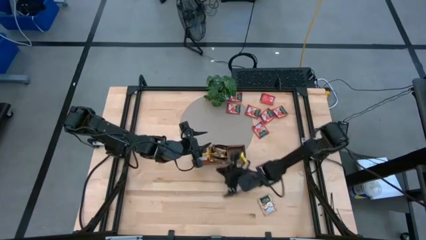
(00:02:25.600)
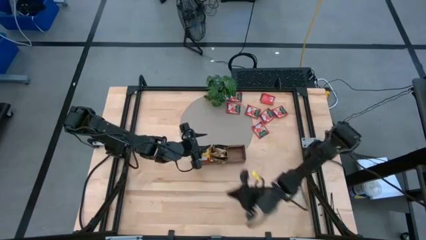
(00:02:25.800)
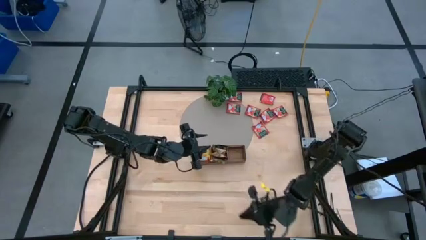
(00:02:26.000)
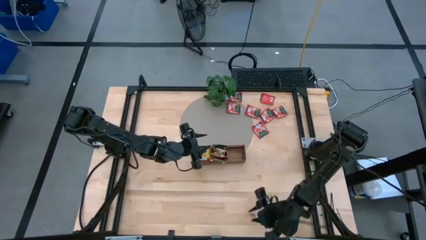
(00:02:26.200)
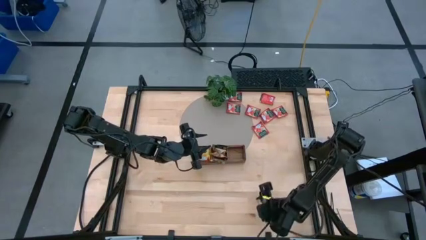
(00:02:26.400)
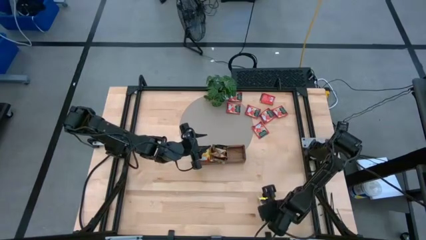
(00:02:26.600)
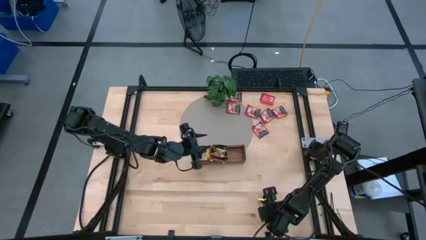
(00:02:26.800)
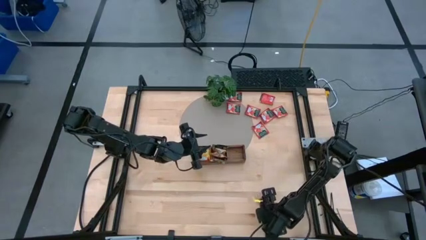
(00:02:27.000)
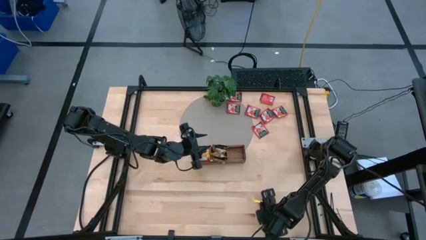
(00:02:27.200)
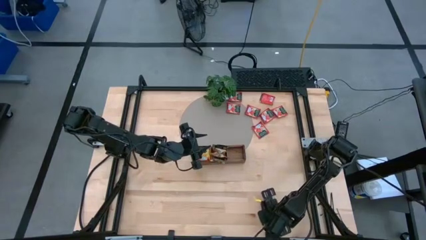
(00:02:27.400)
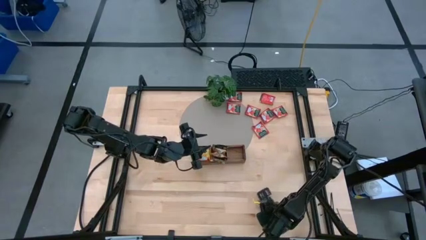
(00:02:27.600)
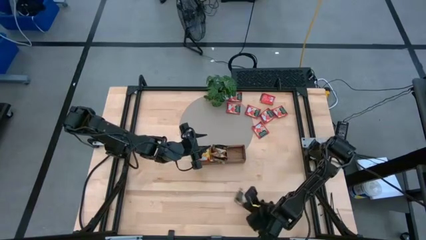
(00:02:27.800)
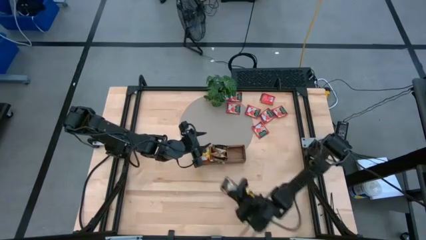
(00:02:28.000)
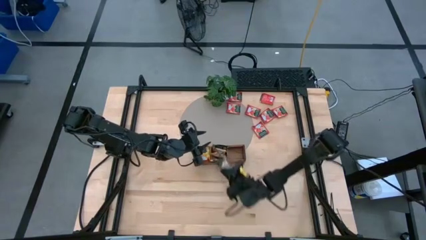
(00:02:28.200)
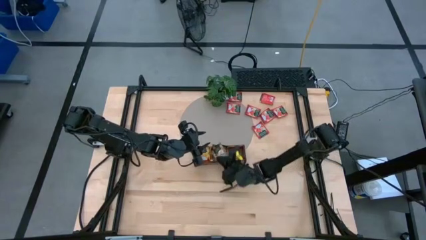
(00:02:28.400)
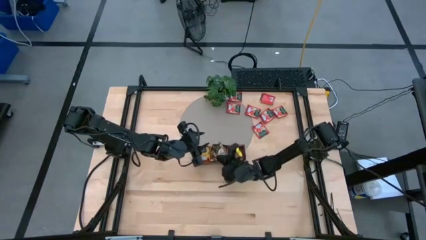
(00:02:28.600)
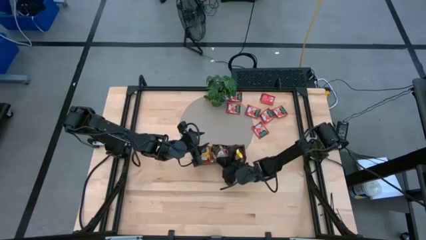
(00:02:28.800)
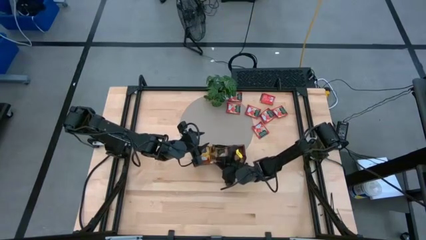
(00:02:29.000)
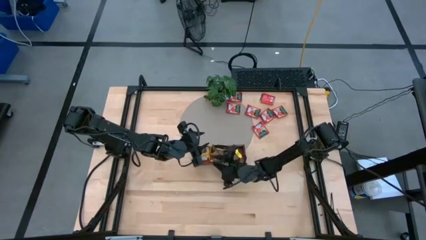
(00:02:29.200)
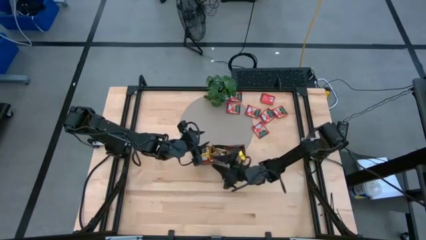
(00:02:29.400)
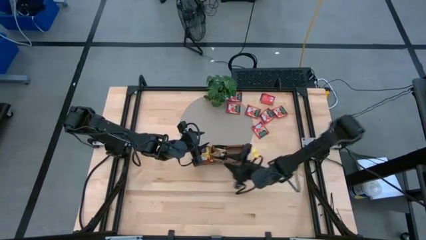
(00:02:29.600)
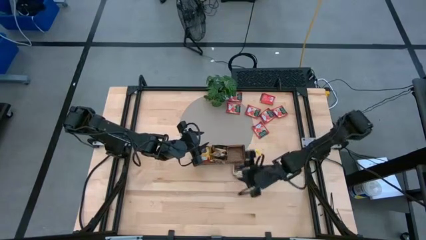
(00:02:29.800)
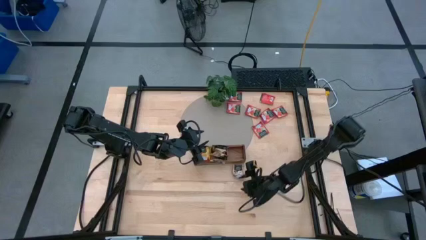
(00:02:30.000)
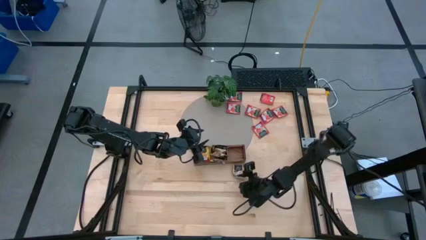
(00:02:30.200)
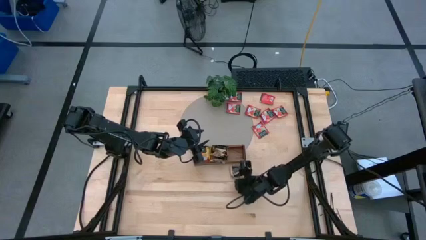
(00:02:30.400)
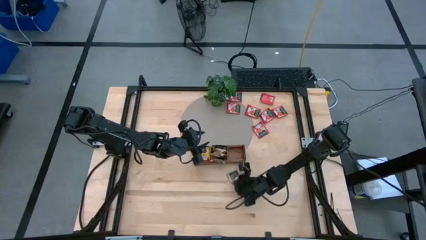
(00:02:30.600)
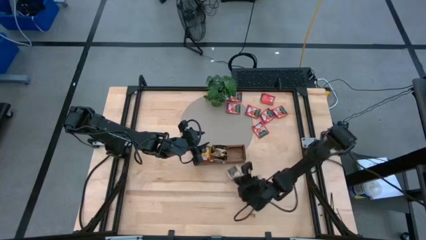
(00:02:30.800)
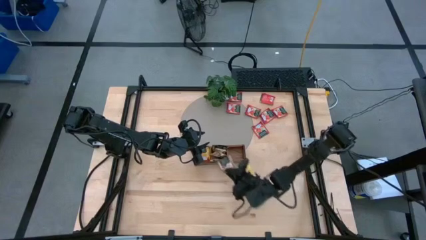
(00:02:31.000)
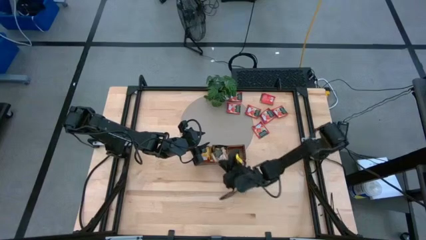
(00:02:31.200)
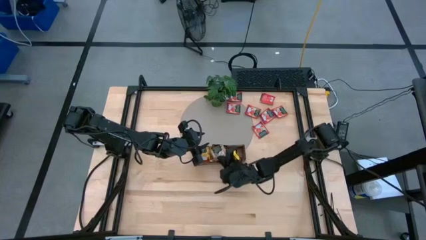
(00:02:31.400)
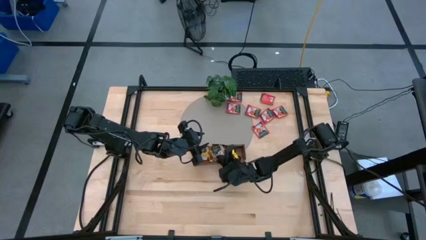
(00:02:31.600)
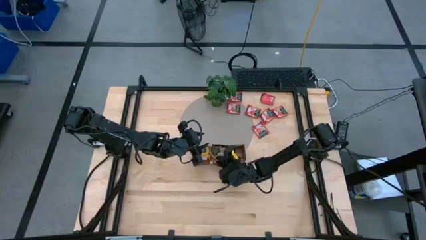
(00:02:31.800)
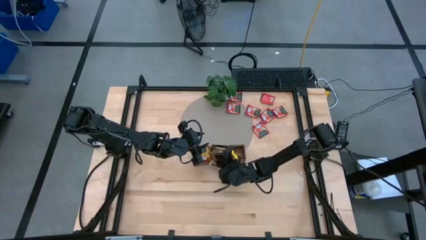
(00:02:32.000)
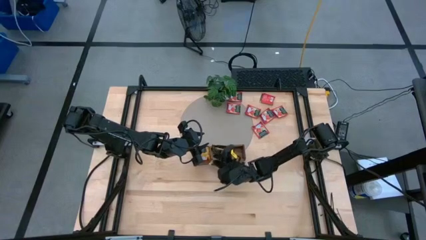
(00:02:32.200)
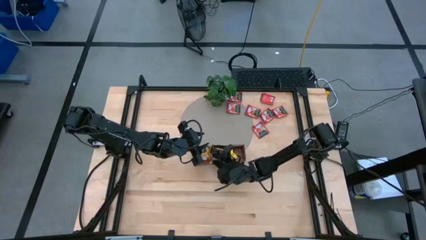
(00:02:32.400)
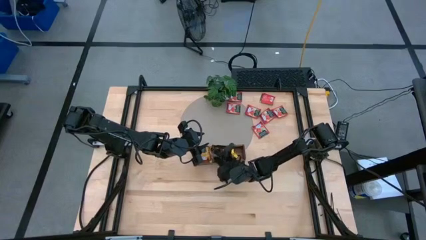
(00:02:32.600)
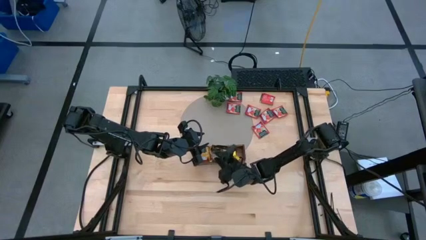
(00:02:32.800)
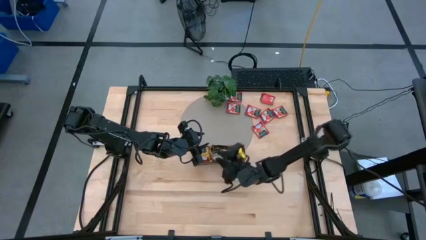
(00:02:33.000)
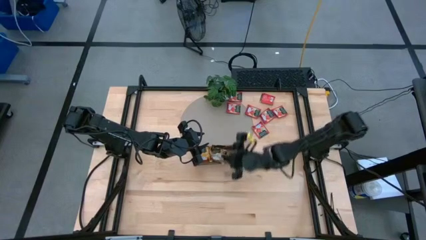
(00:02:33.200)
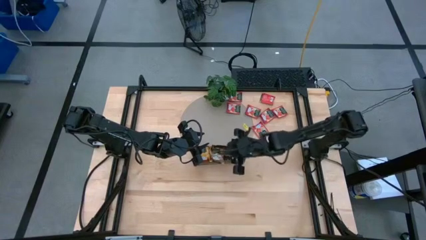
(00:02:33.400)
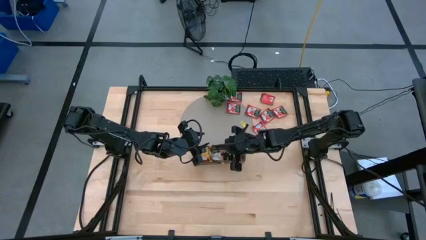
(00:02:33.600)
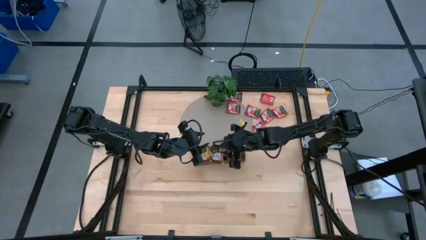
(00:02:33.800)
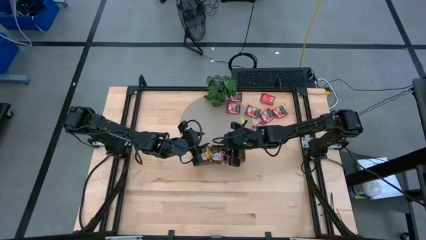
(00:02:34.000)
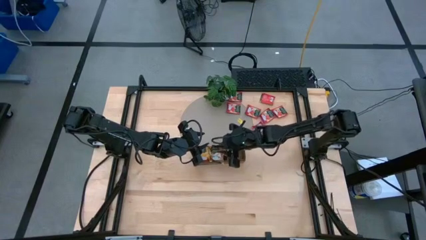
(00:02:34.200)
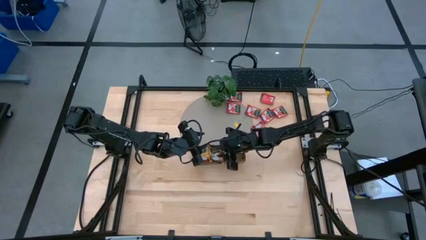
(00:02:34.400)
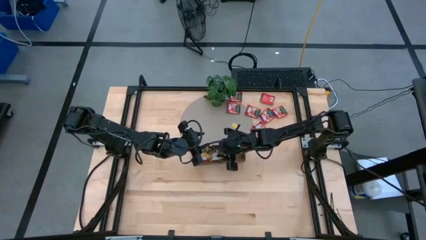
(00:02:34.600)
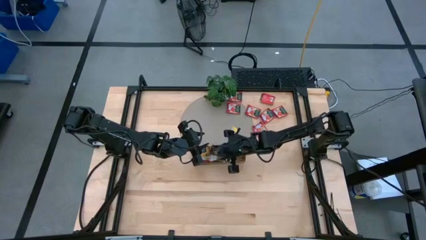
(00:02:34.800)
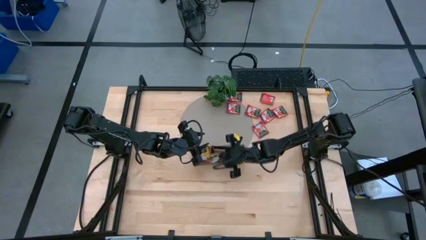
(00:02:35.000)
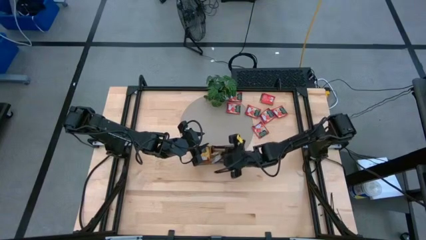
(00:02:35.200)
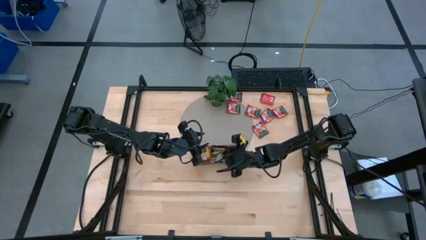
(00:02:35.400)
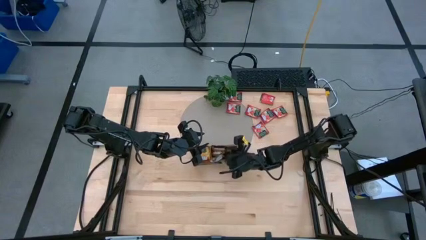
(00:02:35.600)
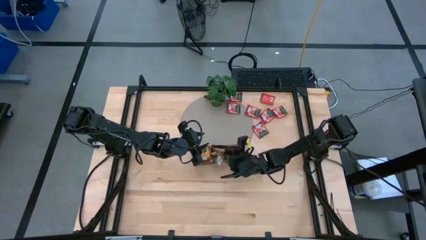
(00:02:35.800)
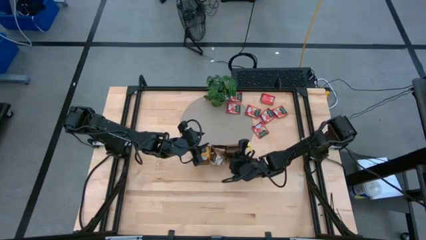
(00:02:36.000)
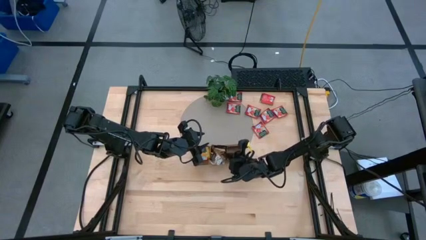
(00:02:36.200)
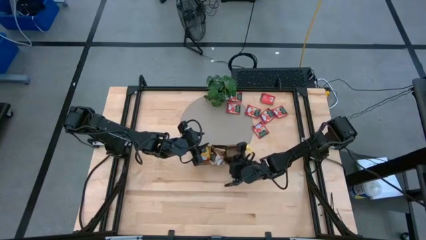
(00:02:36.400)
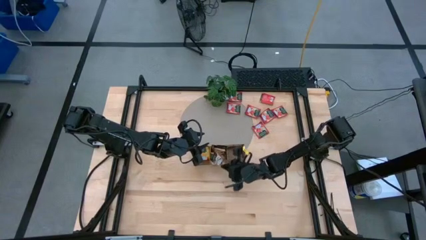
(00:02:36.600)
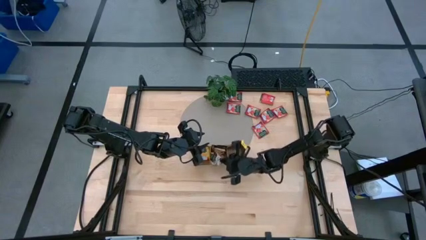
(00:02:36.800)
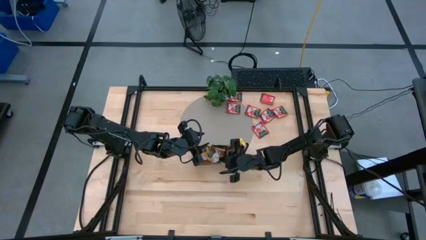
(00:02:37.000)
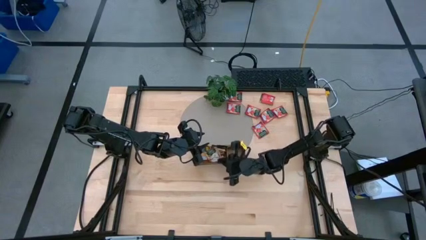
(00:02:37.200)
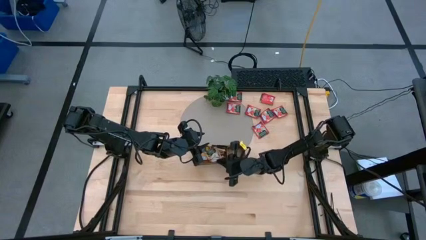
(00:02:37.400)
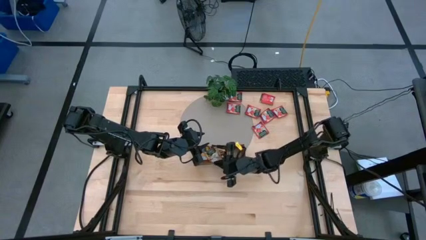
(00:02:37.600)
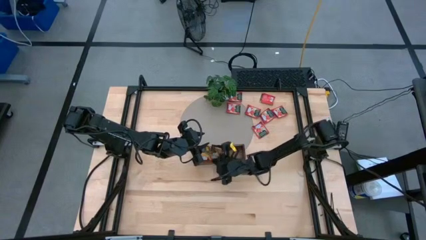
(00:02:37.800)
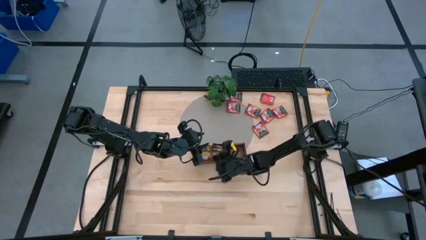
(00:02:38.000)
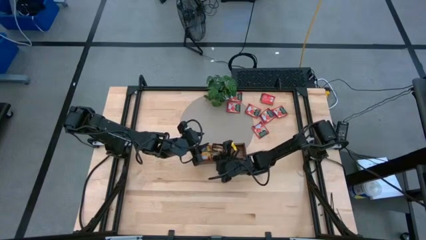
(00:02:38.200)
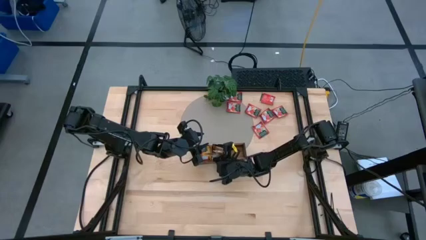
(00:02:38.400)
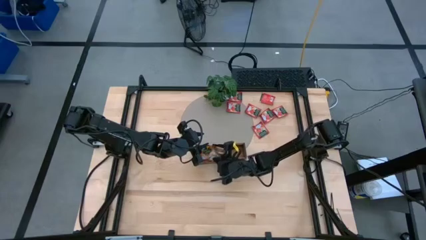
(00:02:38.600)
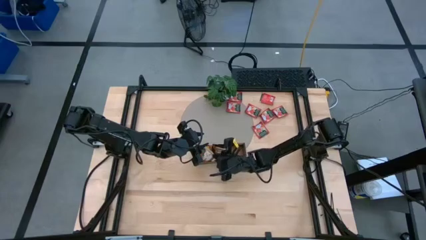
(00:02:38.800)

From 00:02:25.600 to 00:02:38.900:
Task: Pick & Place Tea
Put the brown tea bag into the middle slot of the wooden organizer

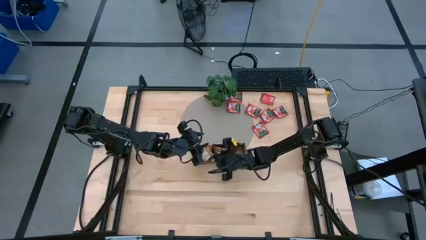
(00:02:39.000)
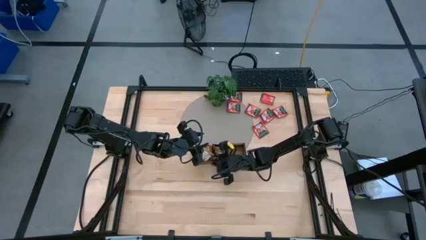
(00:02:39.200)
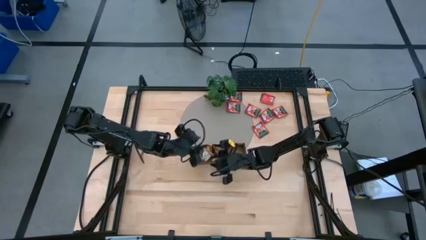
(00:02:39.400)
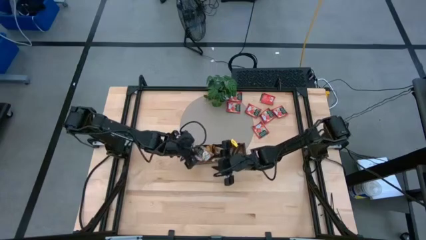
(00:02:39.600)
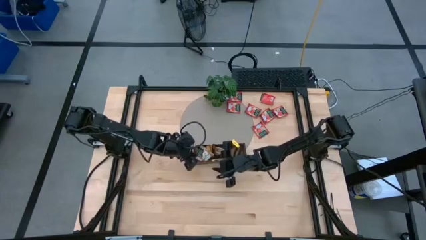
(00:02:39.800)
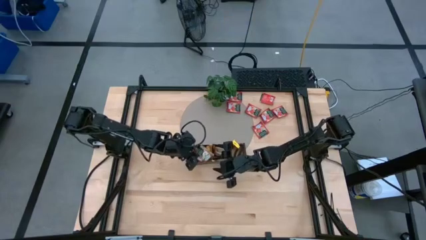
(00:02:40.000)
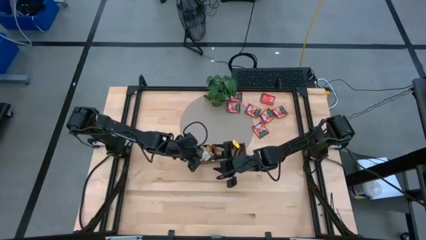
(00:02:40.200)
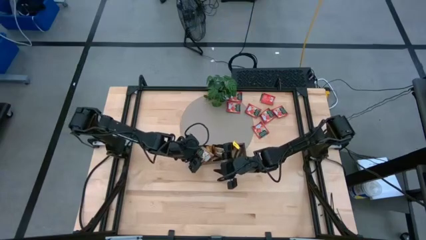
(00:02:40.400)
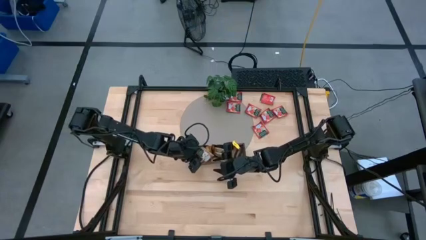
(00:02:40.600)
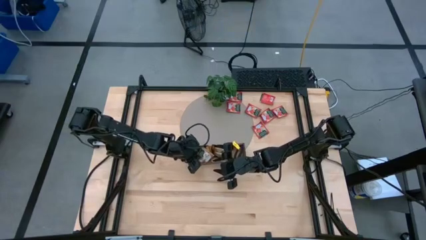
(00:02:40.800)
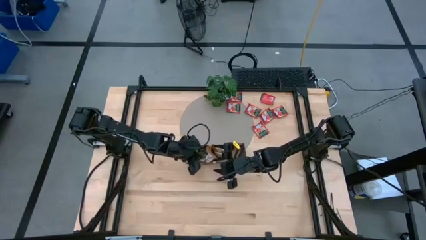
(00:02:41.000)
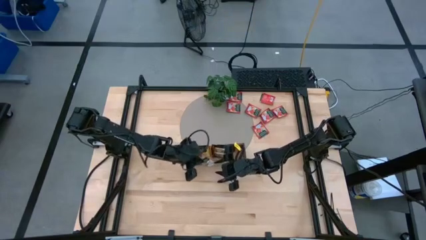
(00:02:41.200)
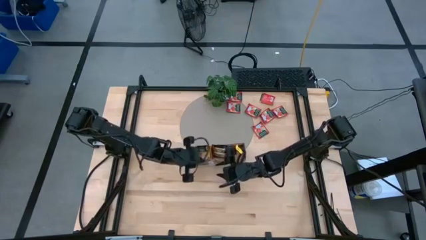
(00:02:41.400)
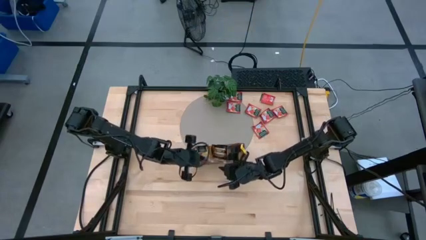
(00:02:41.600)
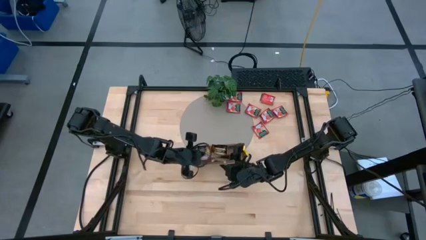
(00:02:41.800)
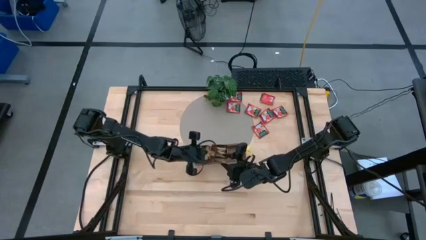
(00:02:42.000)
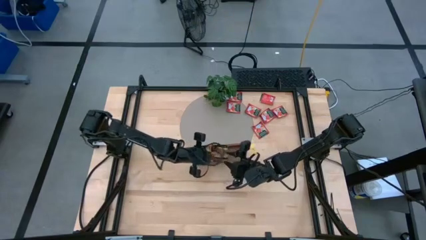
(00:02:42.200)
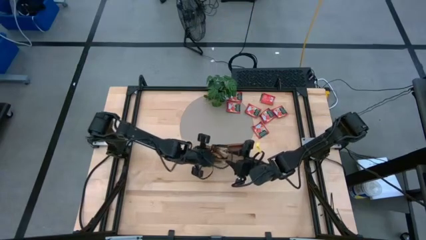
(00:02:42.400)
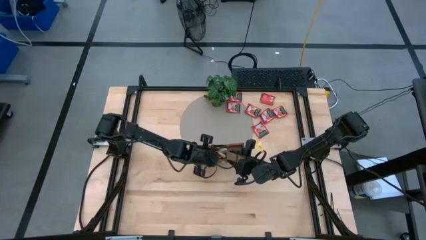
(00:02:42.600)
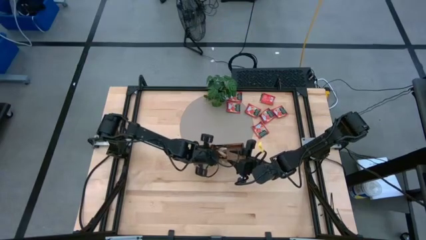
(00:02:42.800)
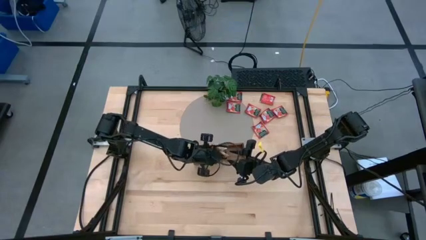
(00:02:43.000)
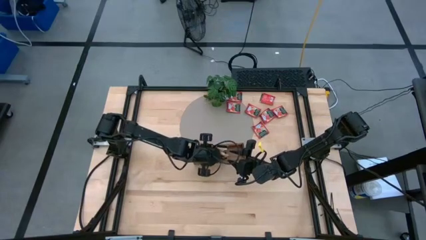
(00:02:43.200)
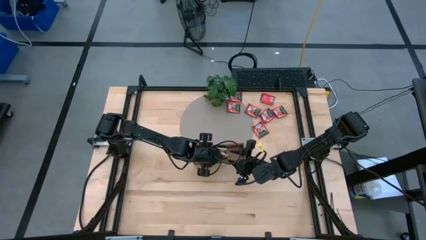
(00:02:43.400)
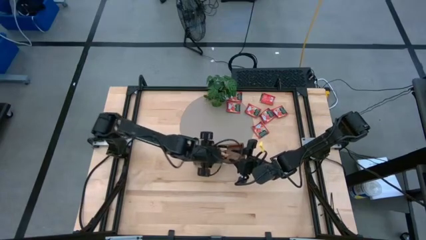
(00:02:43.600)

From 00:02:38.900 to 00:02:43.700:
Put the brown tea bag into the middle slot of the wooden organizer
